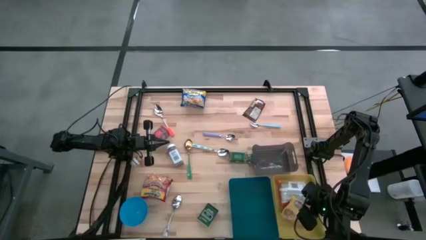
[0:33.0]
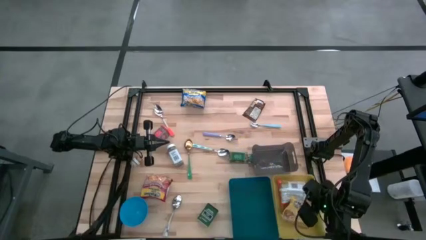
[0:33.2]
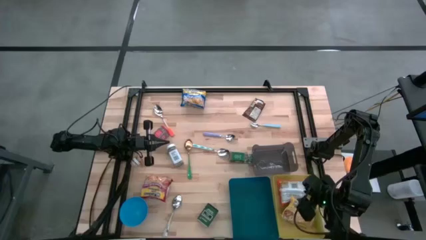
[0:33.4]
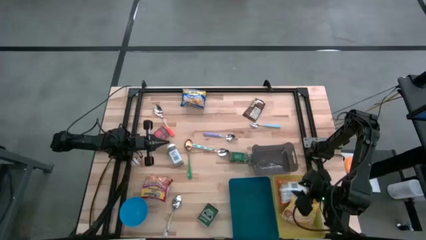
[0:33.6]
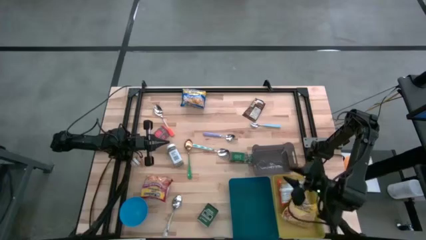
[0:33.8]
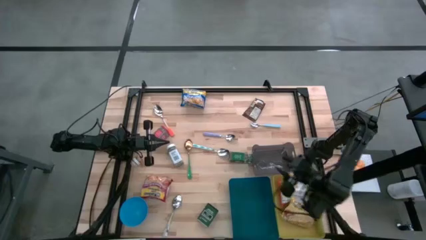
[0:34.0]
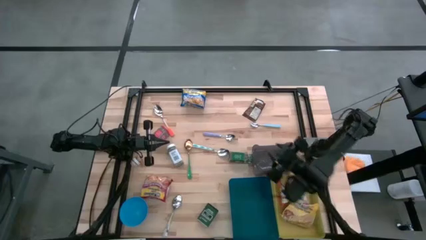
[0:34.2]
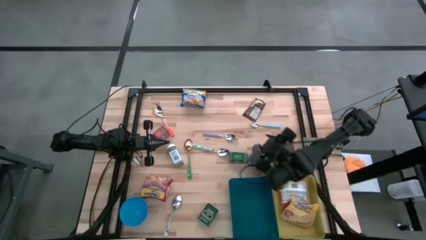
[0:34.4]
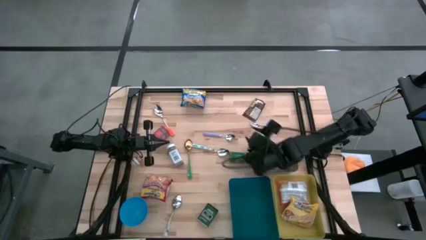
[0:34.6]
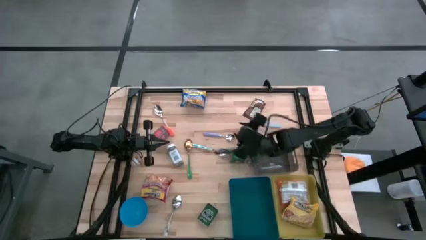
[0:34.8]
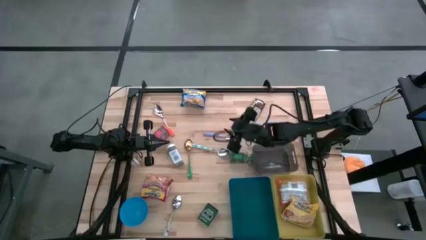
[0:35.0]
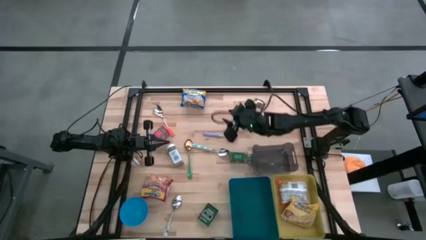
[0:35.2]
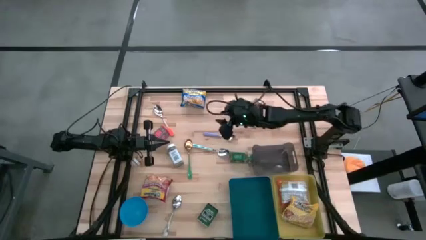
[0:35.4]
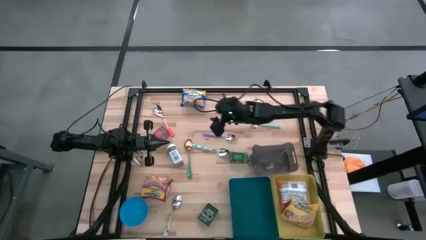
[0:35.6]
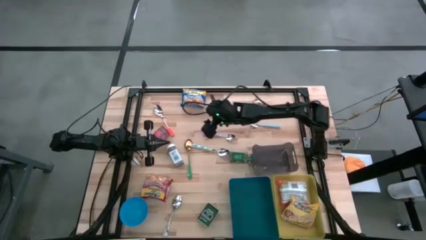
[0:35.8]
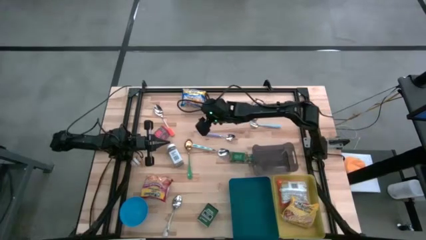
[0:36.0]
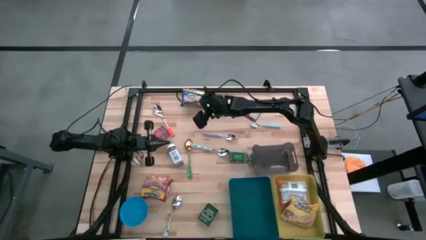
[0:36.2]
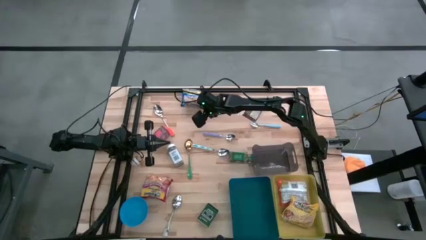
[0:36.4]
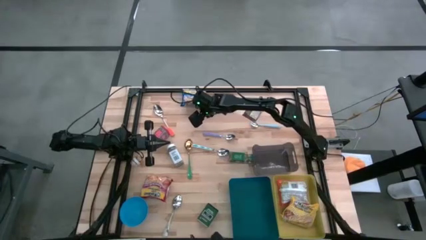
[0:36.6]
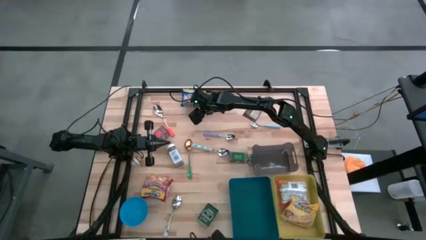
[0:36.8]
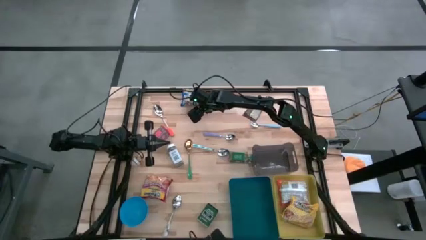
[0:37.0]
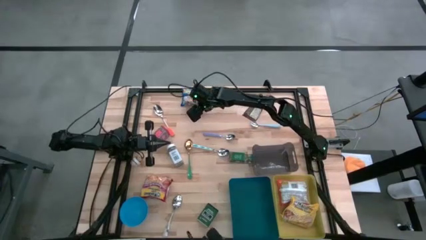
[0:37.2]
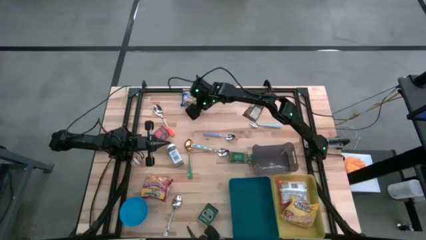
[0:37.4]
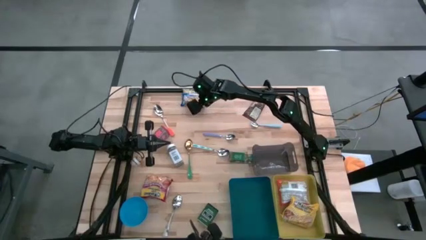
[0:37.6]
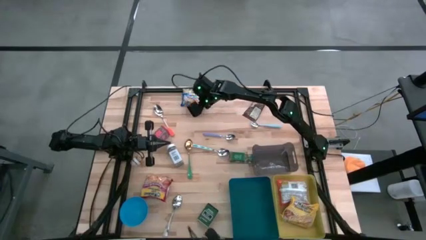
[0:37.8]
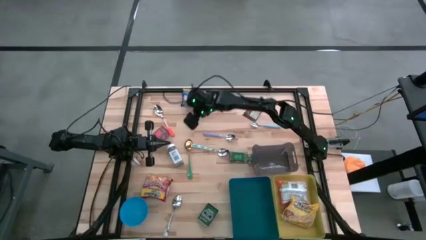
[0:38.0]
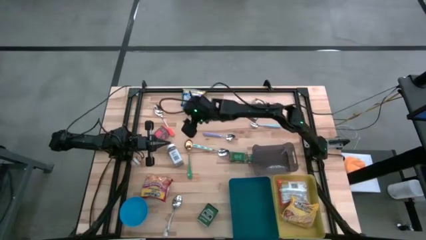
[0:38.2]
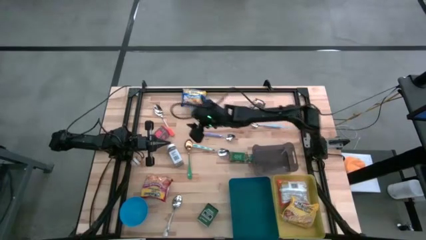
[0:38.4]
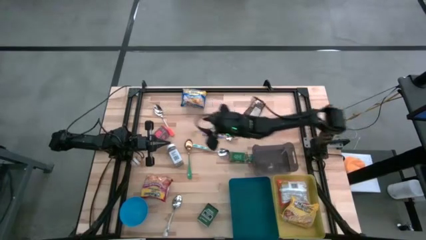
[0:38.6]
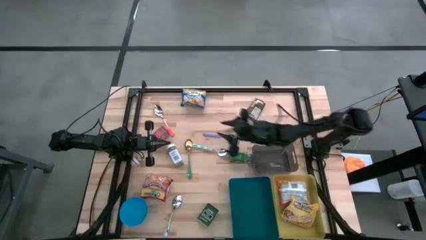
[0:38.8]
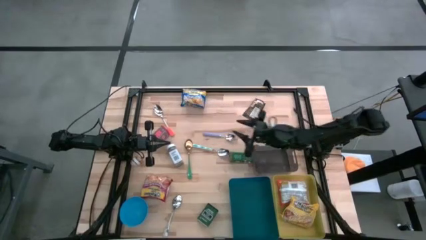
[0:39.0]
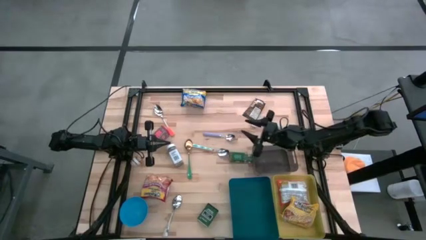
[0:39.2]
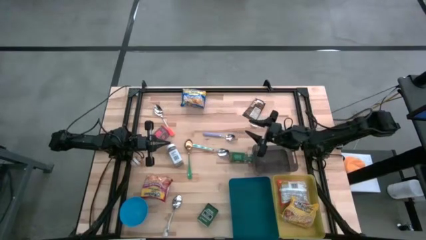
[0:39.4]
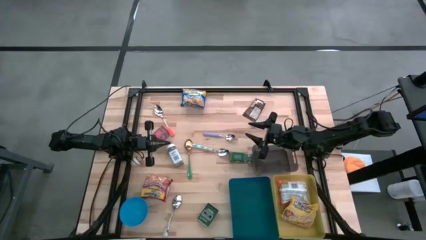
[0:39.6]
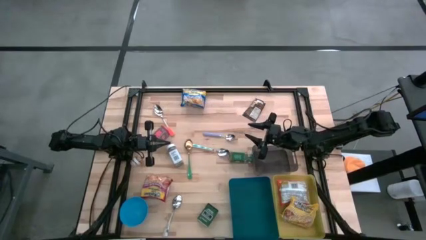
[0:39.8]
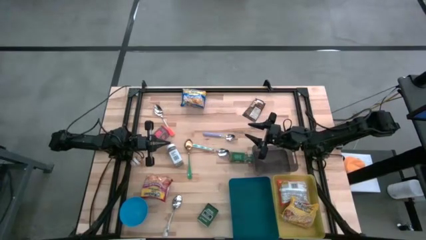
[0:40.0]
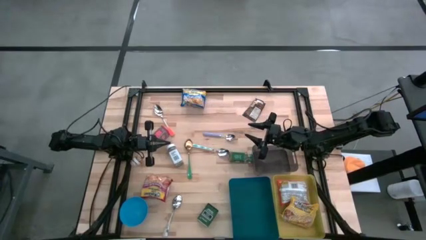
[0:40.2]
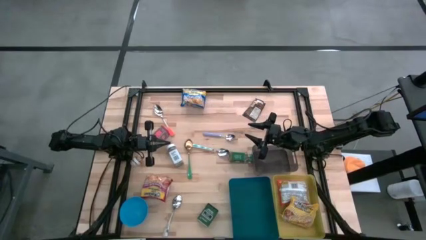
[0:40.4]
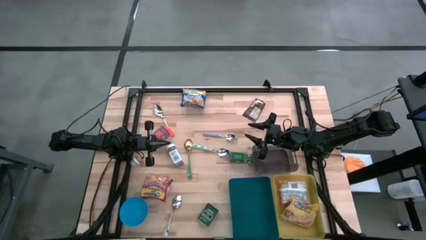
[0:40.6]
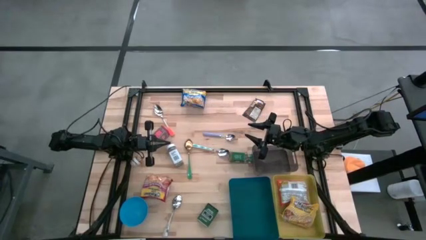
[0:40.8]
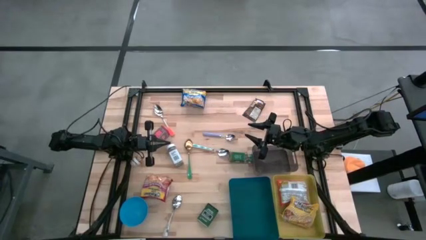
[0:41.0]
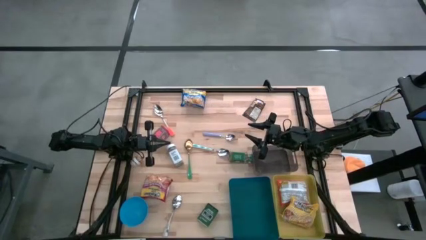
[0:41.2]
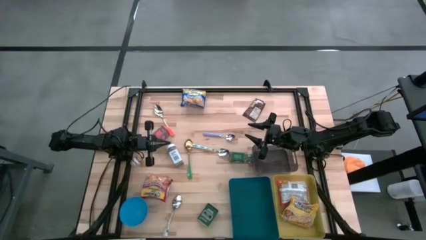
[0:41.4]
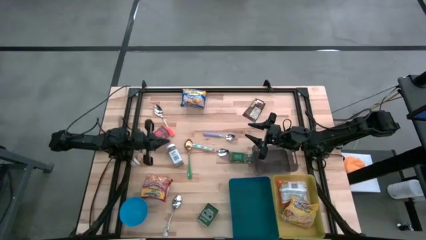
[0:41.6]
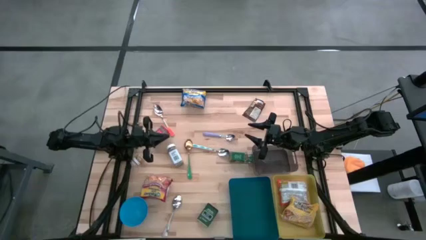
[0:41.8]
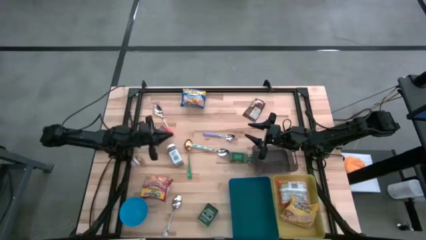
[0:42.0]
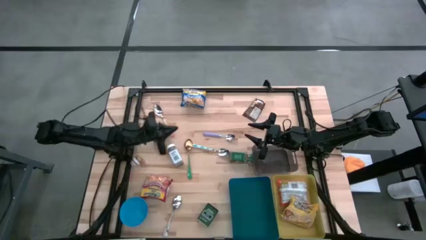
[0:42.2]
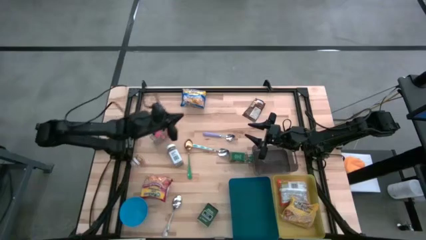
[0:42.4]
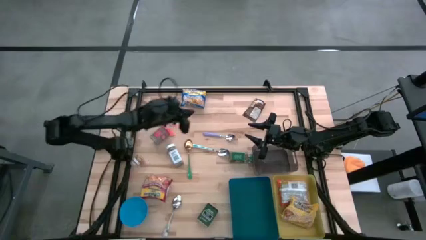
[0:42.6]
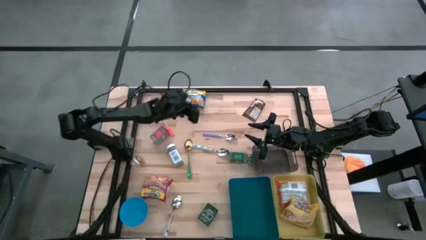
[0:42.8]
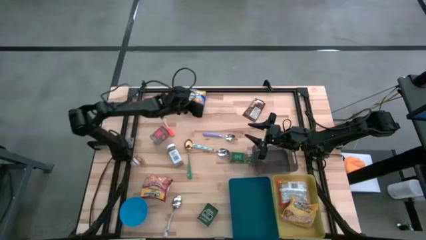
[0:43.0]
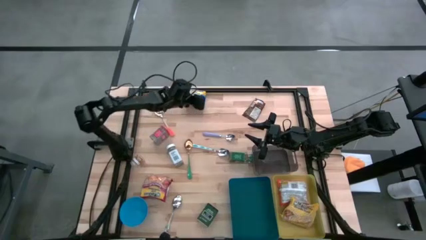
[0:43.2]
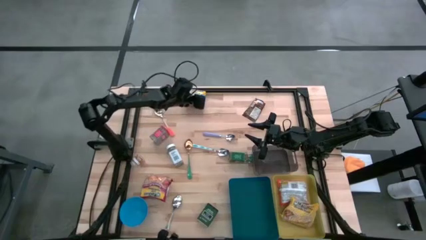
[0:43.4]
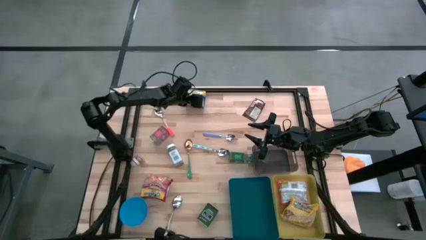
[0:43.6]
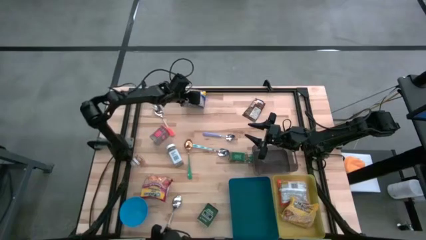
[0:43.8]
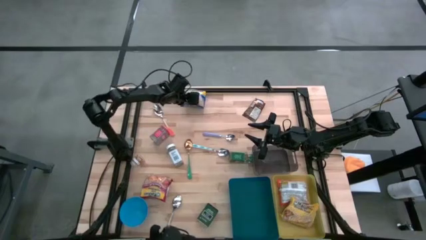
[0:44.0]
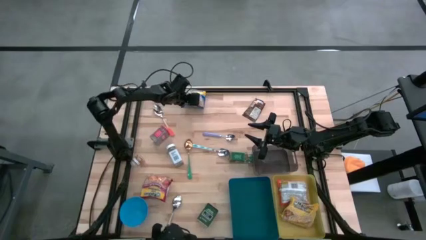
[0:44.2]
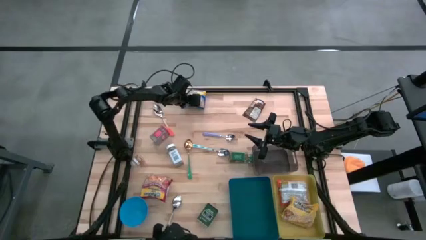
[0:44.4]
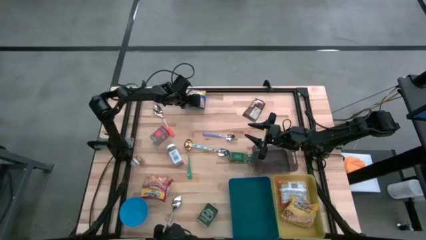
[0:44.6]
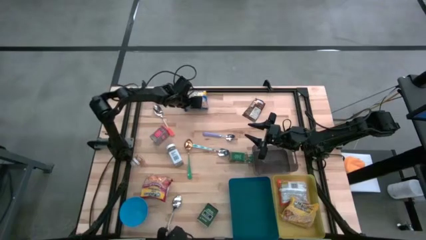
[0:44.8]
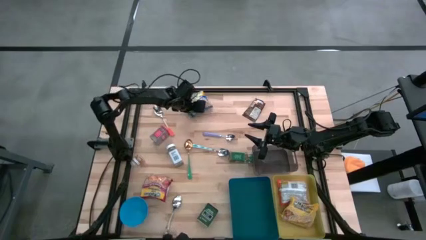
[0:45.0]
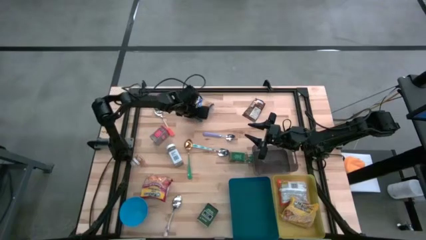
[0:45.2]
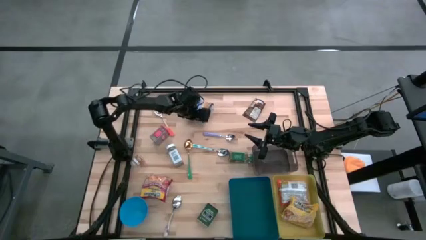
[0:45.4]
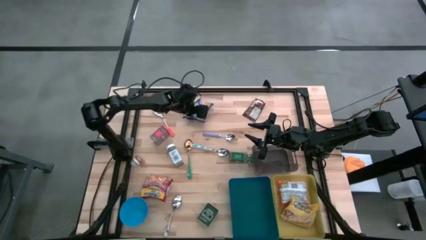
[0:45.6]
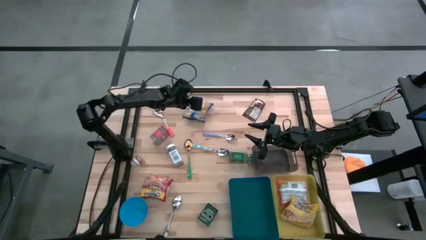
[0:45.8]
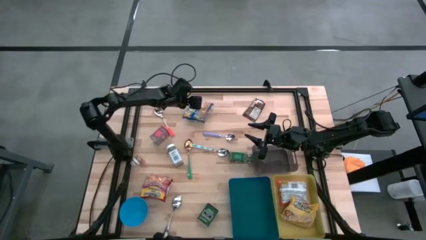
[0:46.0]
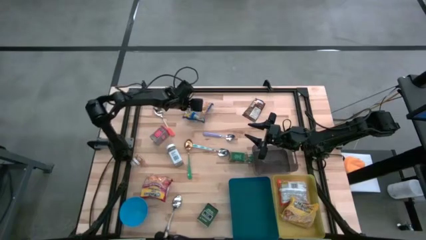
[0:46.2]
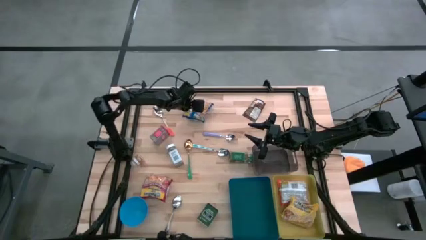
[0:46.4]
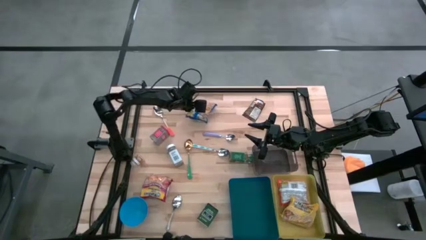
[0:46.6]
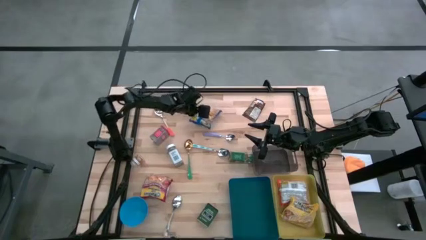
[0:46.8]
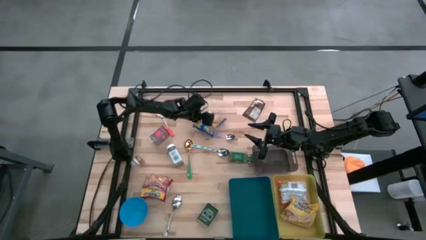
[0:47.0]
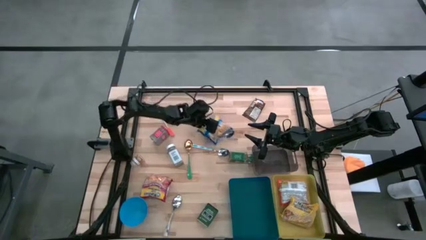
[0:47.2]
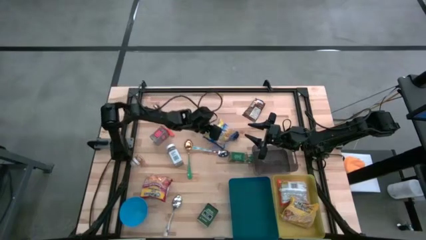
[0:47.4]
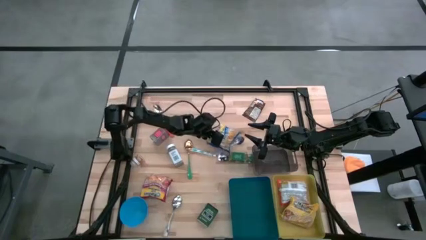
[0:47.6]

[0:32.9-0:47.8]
Put the blue noodle pack into the yellow bin
